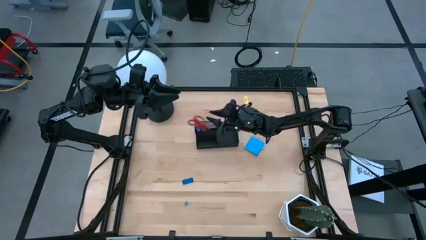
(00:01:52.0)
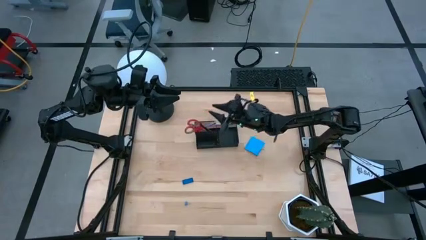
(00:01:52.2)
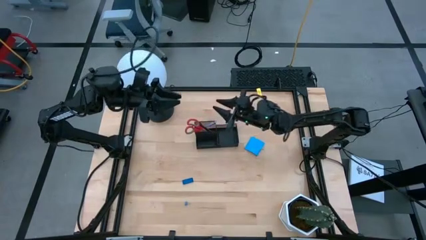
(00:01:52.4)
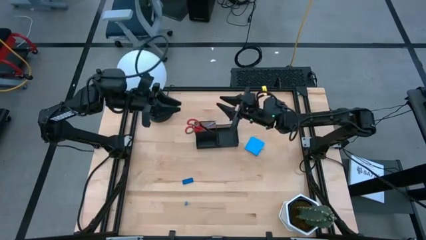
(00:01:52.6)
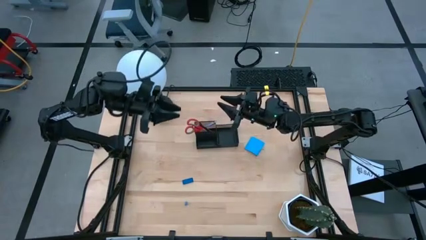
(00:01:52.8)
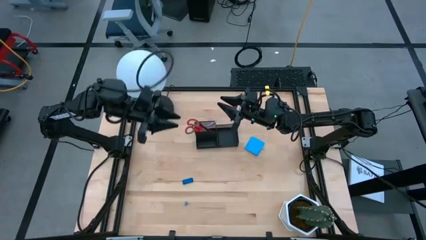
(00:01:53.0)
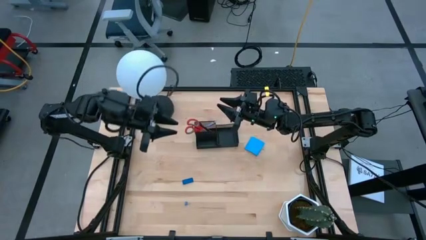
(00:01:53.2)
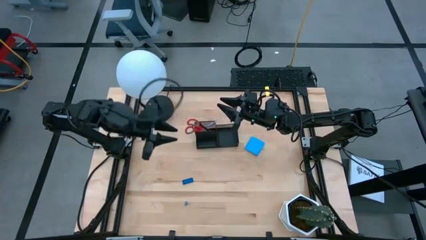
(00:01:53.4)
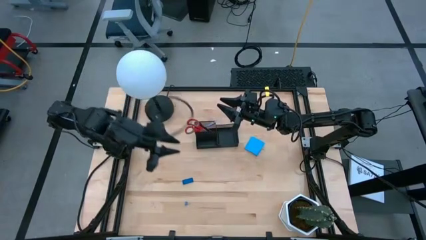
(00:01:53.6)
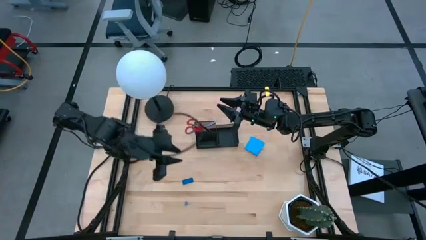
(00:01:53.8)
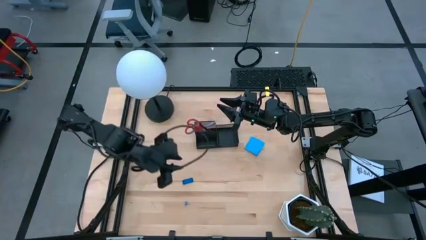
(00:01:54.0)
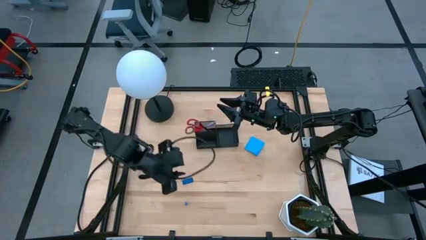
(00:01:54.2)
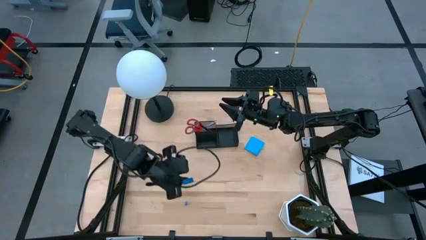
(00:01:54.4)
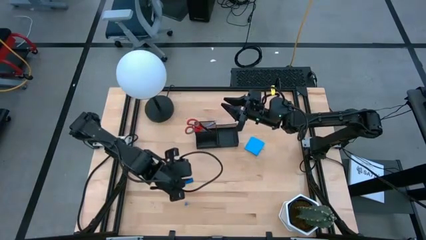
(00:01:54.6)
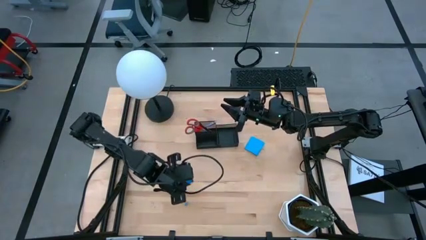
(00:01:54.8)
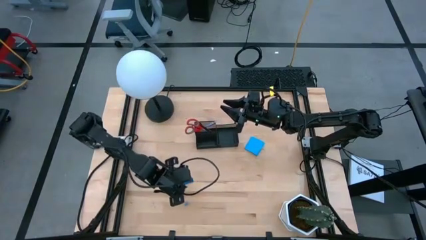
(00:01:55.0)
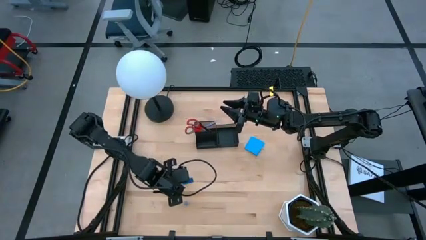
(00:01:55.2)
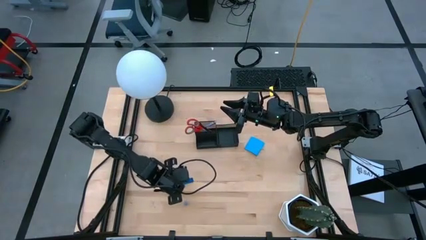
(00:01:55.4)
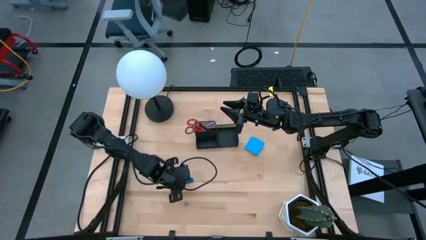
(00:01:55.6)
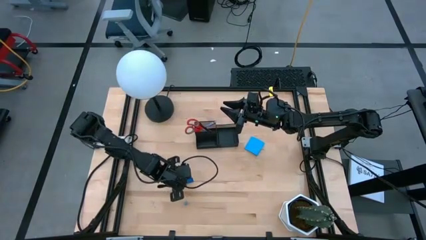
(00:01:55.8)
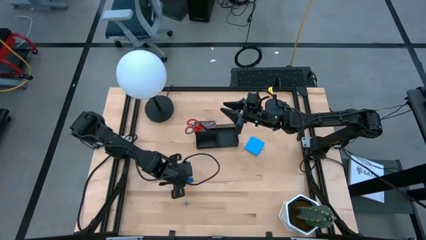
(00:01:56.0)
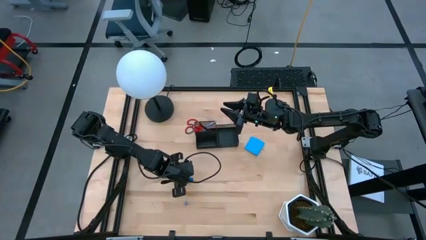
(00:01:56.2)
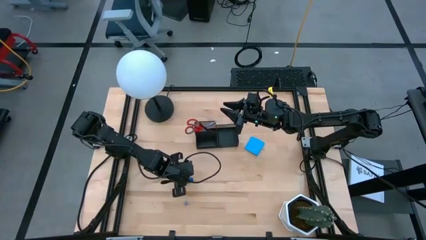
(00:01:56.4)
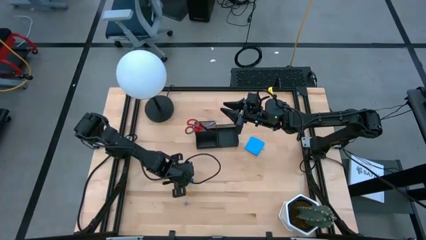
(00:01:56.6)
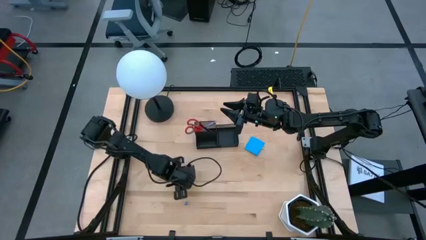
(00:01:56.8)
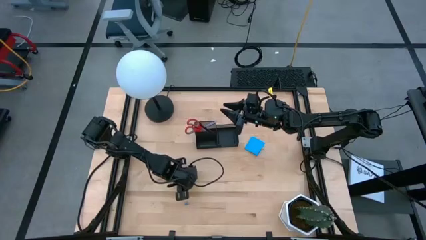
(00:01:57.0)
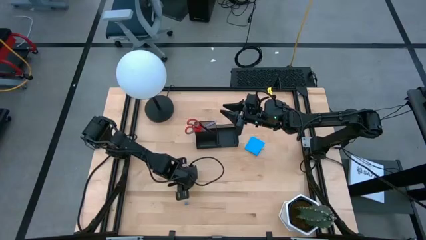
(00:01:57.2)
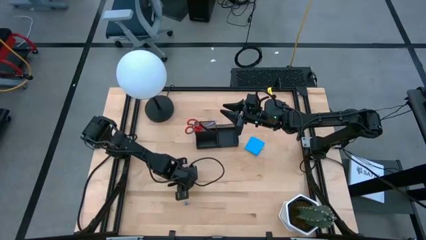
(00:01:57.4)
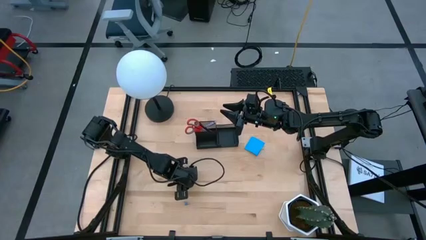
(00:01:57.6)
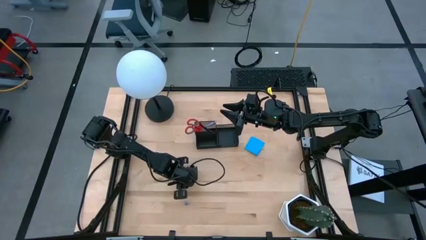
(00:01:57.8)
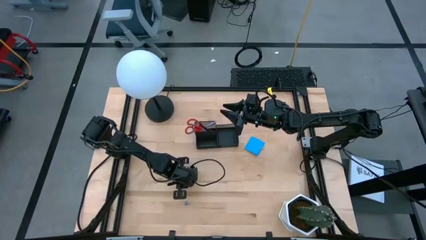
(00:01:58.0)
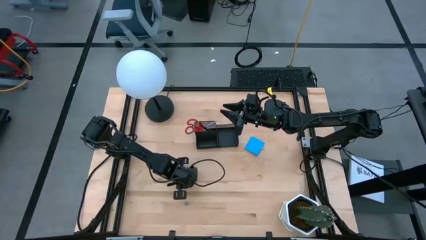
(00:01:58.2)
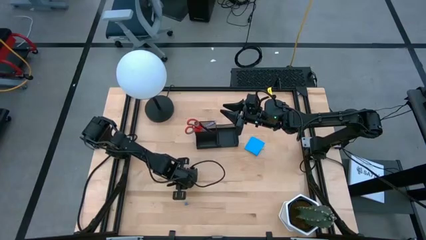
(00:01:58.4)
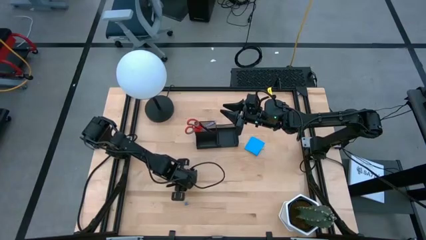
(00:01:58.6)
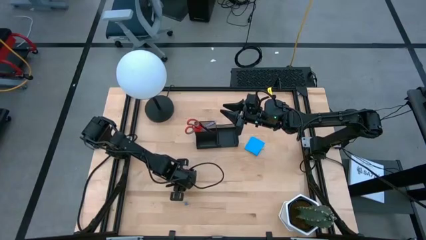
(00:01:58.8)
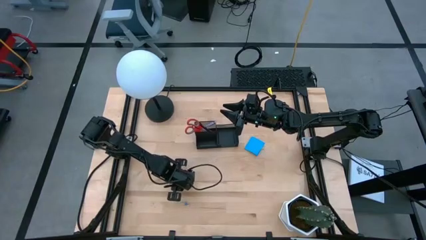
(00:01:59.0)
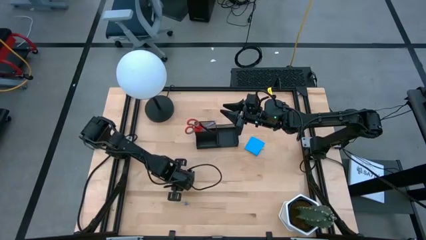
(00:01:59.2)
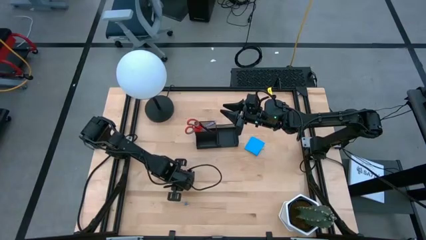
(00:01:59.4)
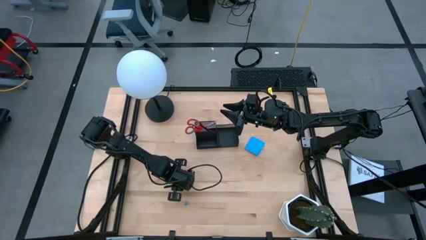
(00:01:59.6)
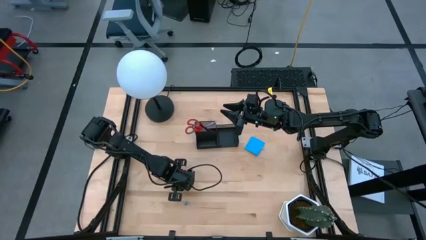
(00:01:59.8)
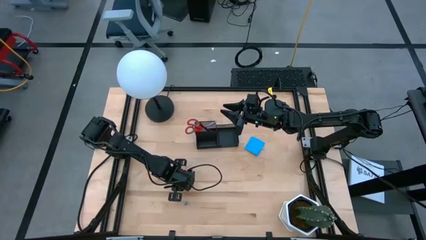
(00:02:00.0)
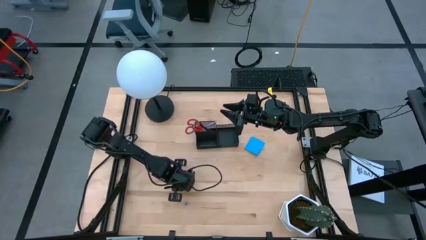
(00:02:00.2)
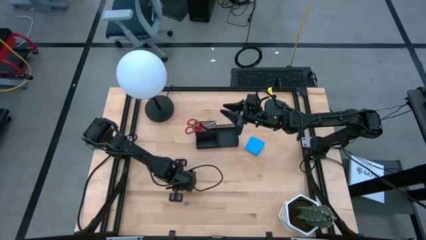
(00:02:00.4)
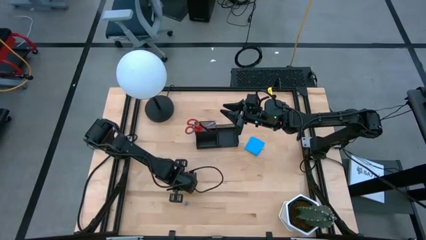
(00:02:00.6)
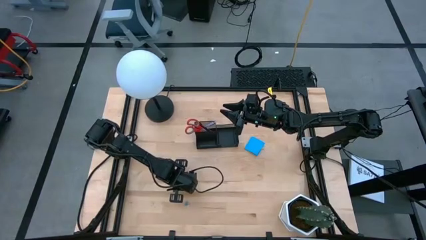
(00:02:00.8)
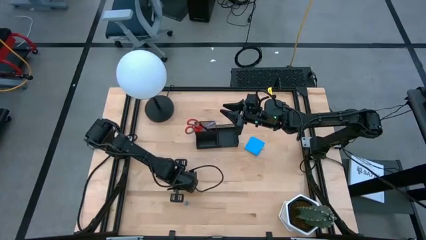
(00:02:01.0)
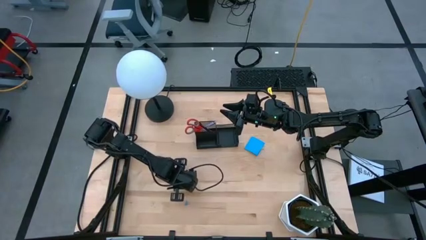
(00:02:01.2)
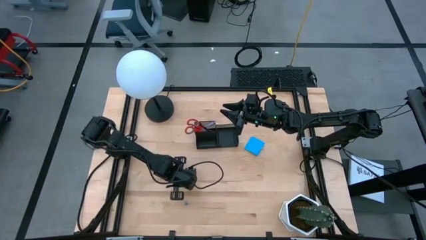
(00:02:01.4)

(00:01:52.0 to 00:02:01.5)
Task: Pick and place office supplies into organizer
Put the blue eraser into the black desk organizer

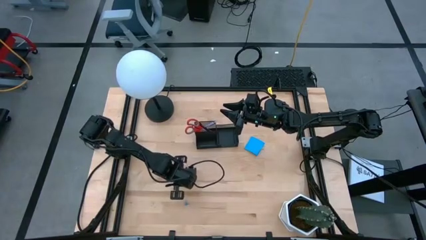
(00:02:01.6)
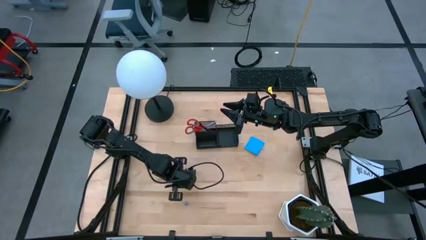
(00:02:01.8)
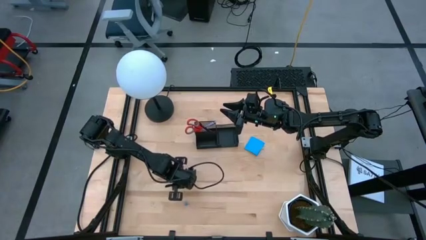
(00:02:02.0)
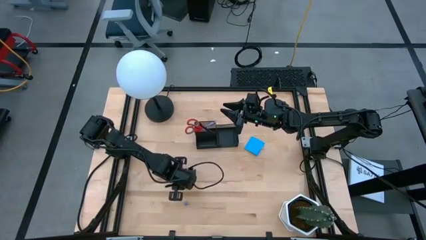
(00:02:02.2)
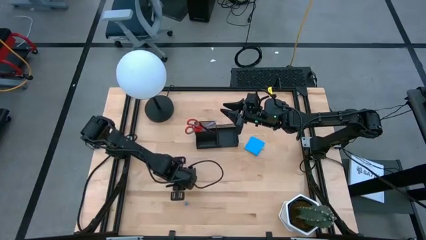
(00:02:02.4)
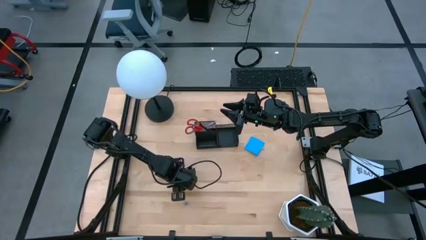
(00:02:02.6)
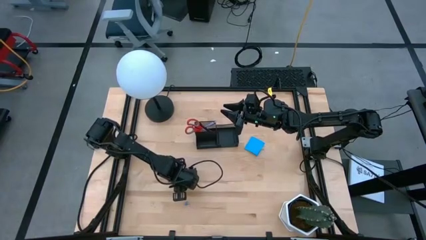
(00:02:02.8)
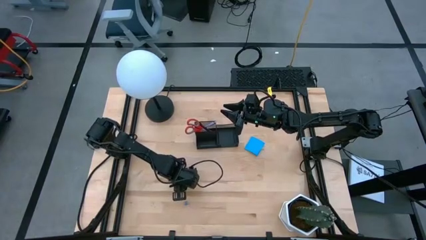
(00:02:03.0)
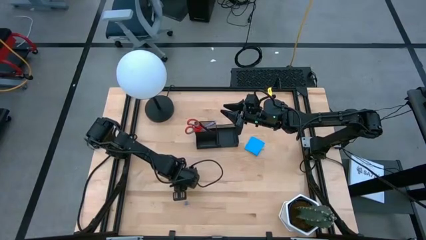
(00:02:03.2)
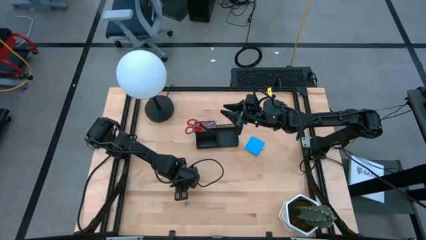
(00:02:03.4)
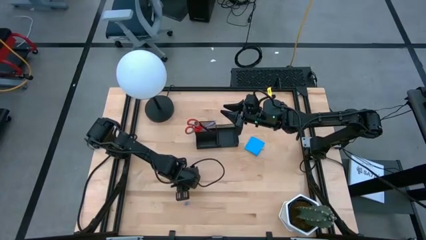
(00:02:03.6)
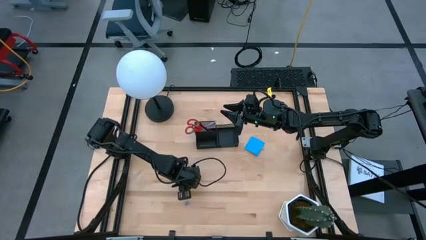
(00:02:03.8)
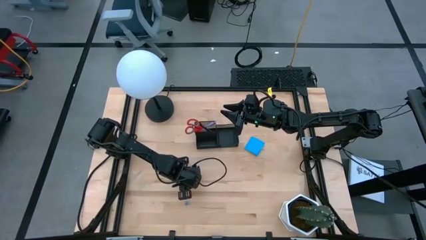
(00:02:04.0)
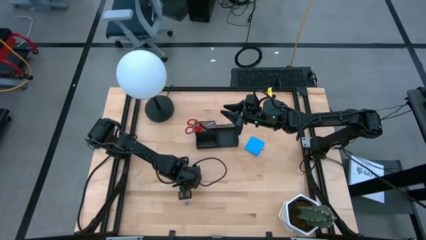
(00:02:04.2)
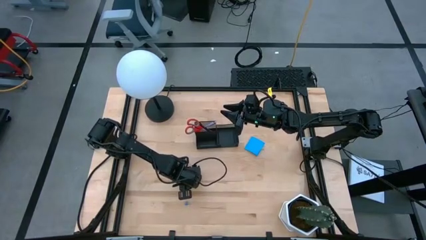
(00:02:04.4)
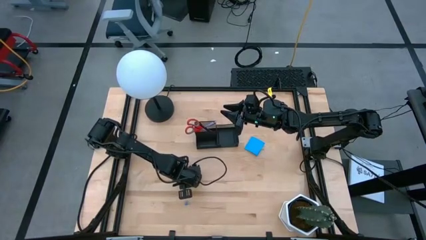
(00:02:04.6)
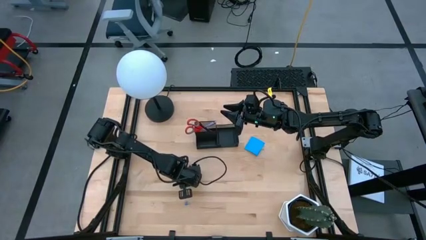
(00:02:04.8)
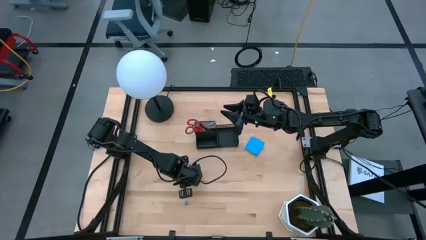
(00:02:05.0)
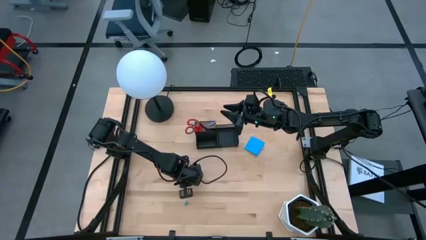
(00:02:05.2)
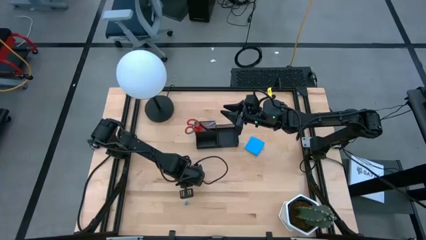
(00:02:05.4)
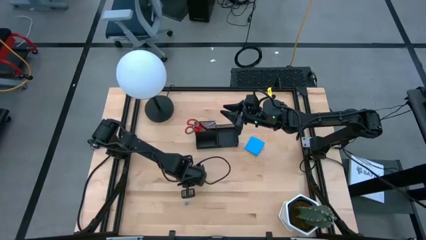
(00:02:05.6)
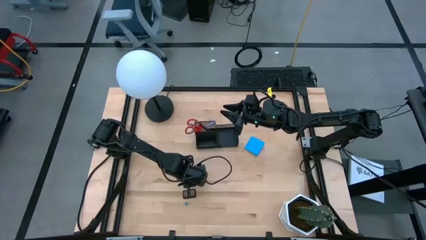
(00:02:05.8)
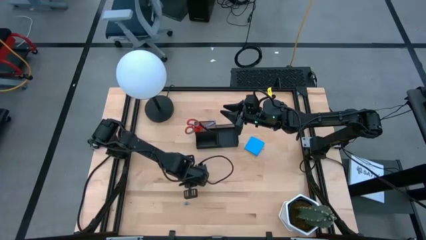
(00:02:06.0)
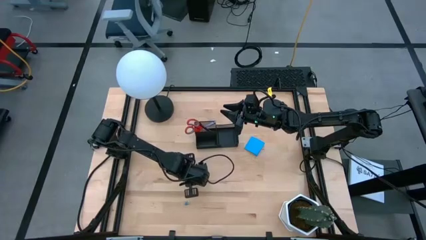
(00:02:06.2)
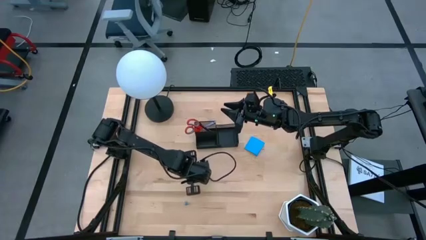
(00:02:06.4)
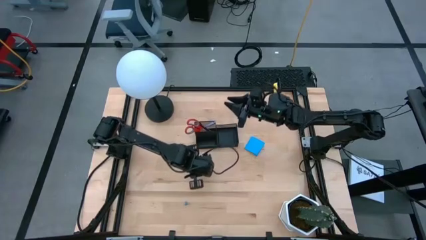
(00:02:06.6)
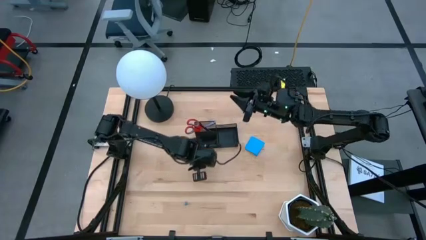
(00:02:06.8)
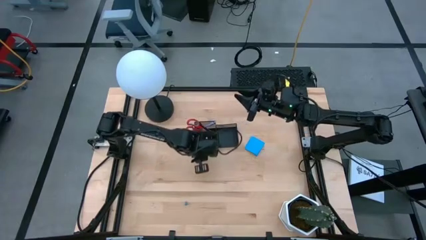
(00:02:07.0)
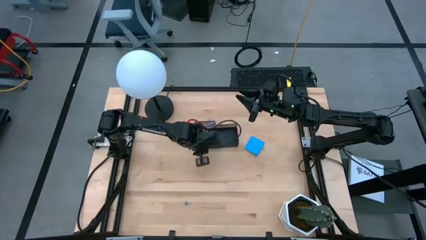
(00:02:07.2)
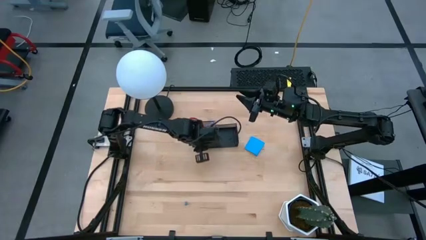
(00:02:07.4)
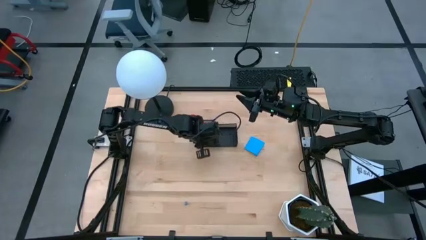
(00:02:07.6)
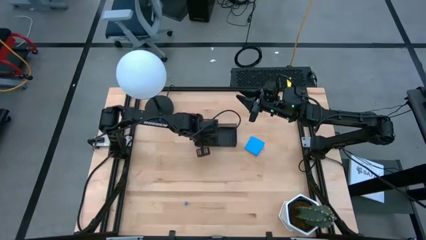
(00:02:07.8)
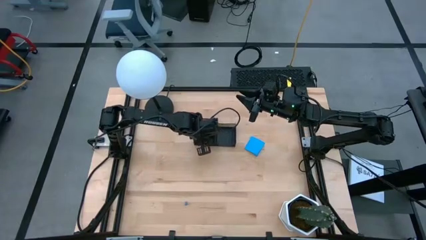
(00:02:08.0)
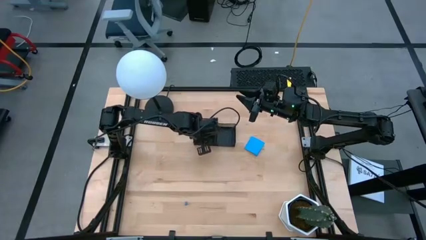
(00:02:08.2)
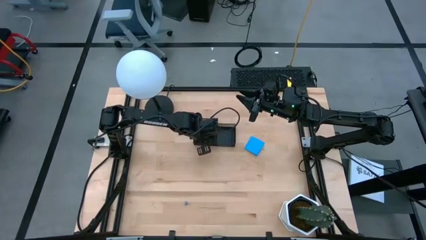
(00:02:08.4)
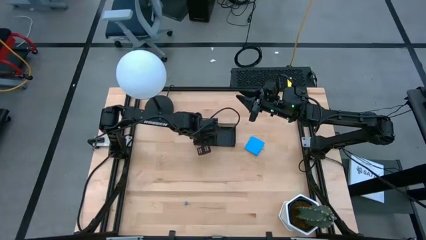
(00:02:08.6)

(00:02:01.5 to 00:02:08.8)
Put the blue eraser into the black desk organizer
